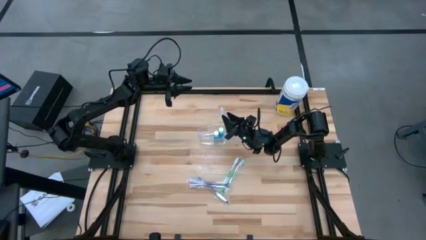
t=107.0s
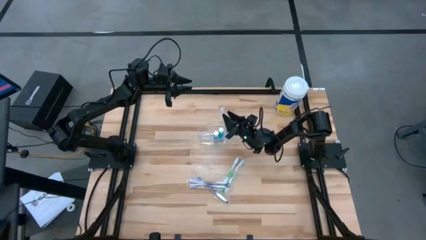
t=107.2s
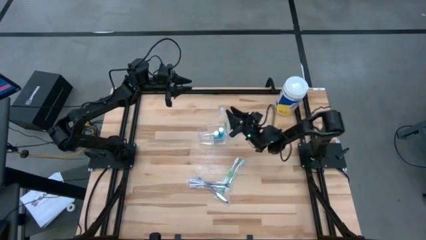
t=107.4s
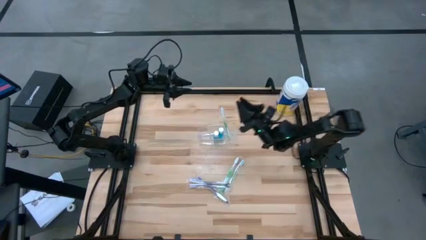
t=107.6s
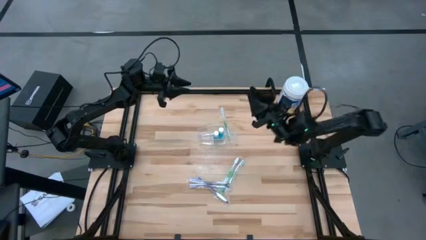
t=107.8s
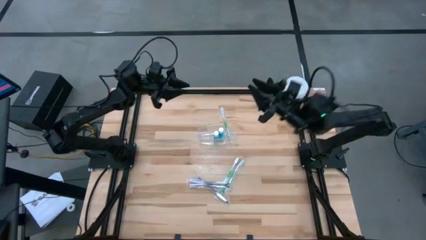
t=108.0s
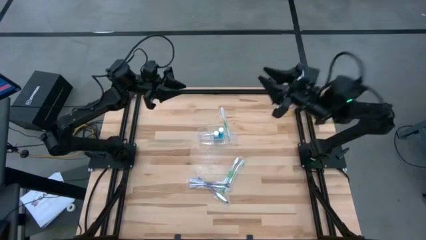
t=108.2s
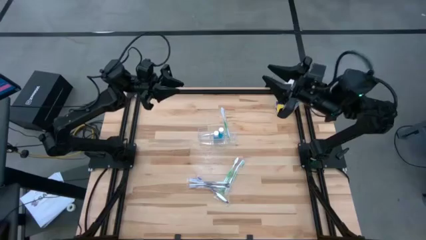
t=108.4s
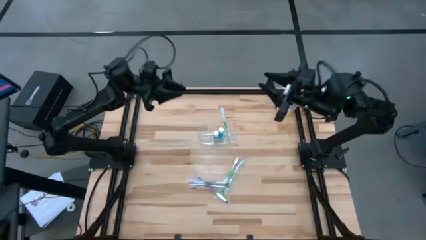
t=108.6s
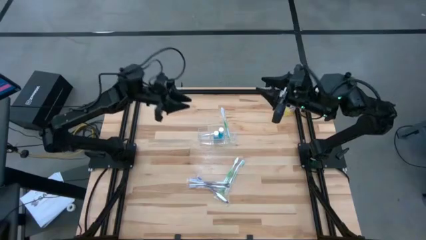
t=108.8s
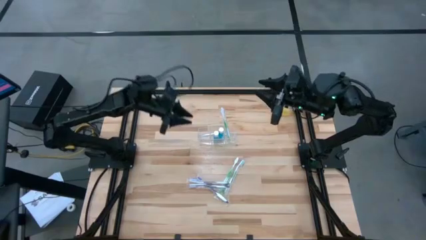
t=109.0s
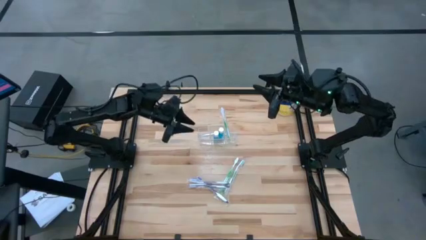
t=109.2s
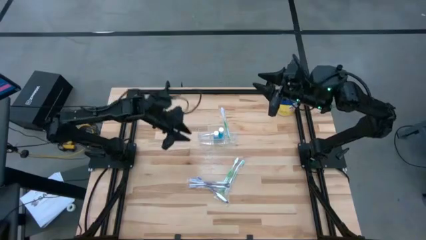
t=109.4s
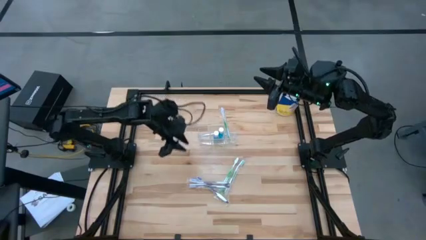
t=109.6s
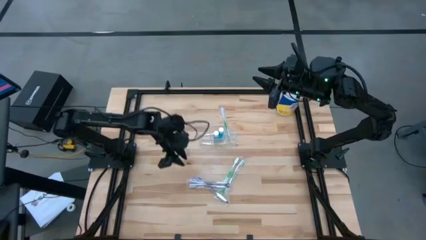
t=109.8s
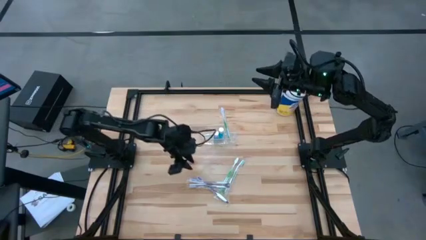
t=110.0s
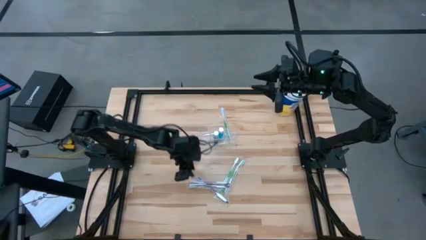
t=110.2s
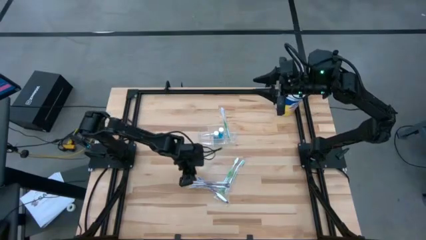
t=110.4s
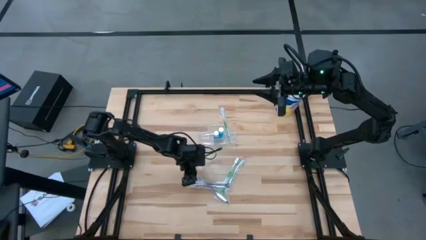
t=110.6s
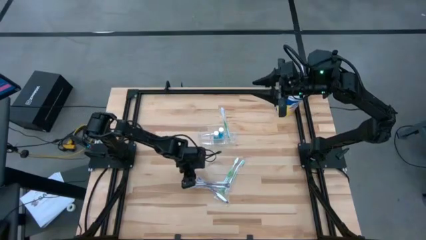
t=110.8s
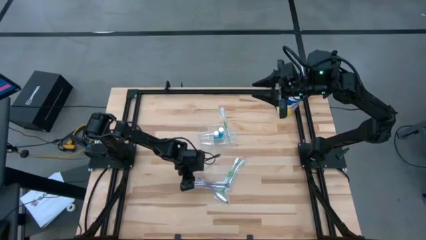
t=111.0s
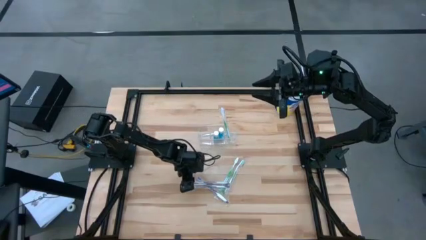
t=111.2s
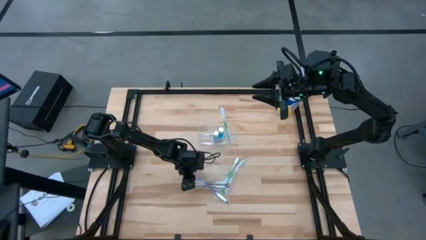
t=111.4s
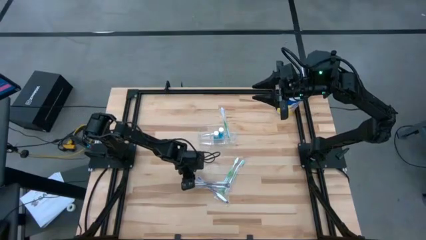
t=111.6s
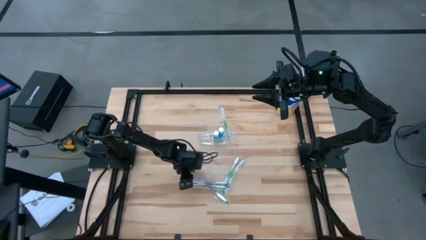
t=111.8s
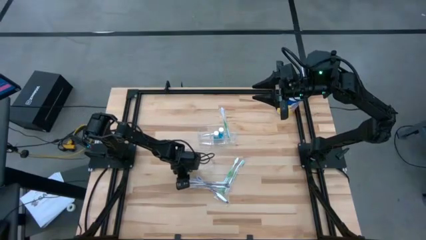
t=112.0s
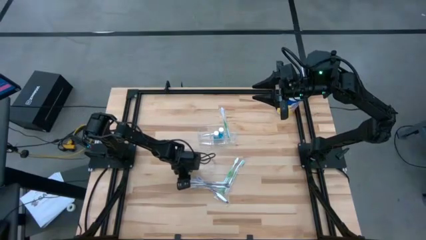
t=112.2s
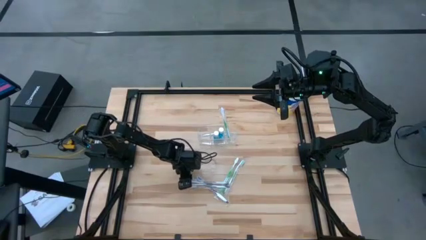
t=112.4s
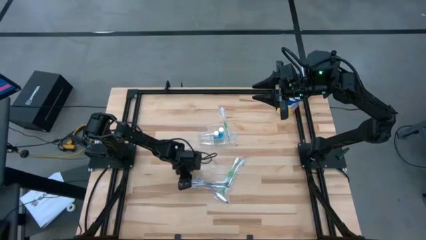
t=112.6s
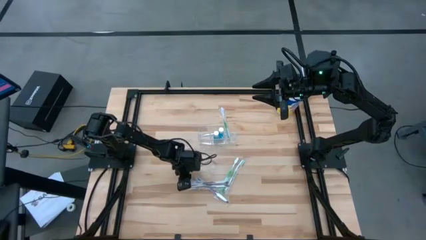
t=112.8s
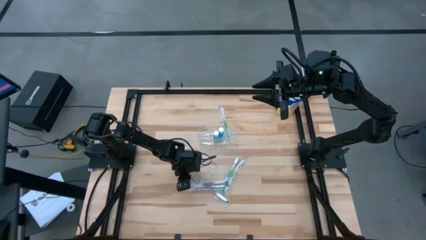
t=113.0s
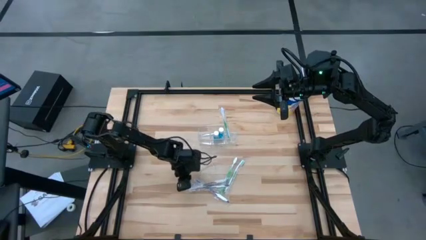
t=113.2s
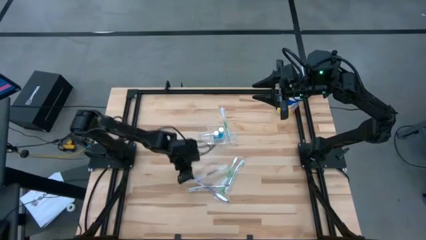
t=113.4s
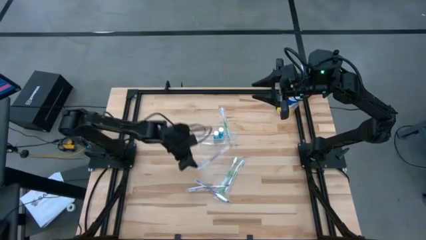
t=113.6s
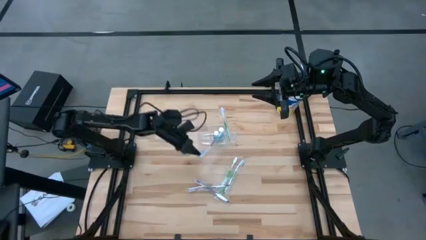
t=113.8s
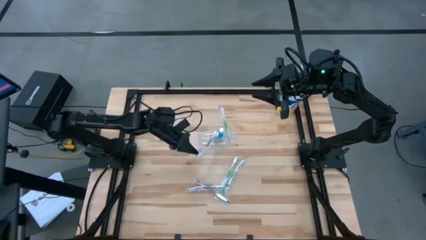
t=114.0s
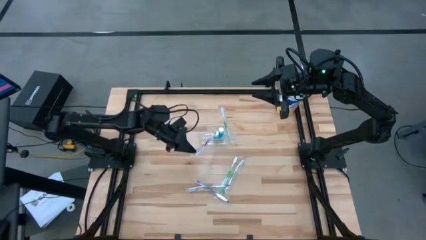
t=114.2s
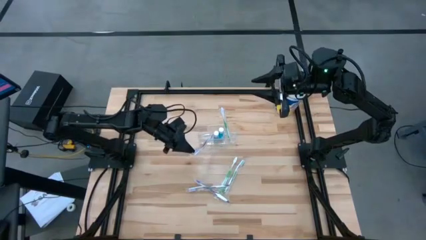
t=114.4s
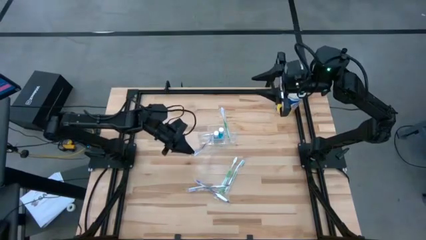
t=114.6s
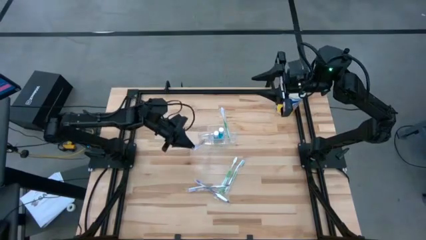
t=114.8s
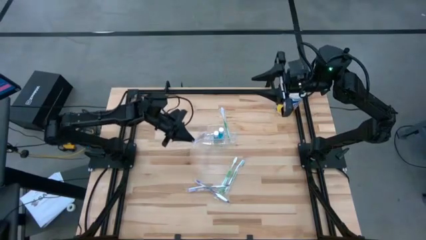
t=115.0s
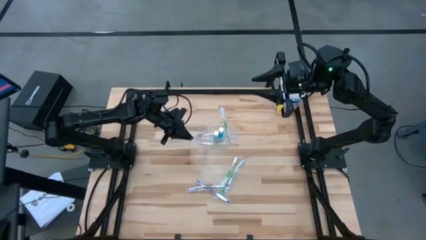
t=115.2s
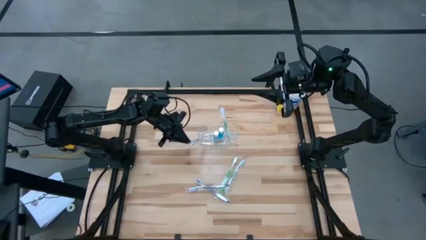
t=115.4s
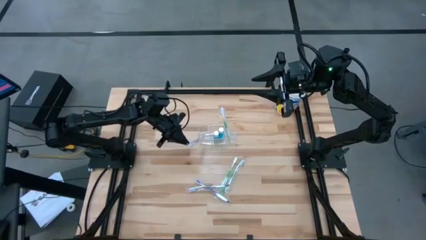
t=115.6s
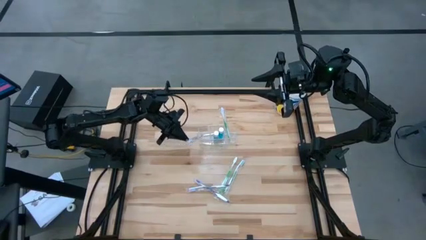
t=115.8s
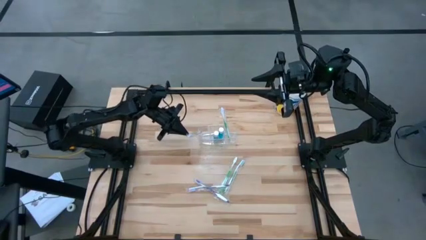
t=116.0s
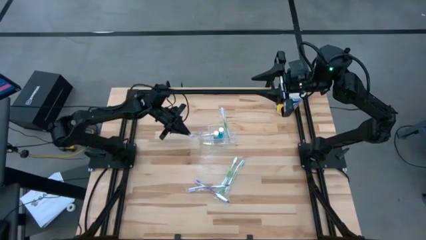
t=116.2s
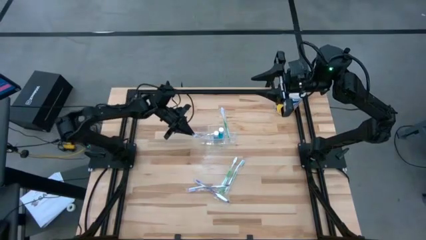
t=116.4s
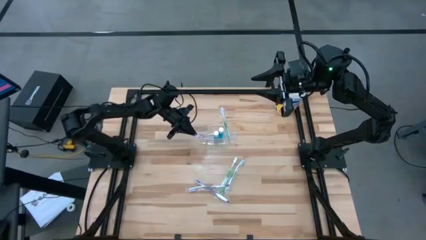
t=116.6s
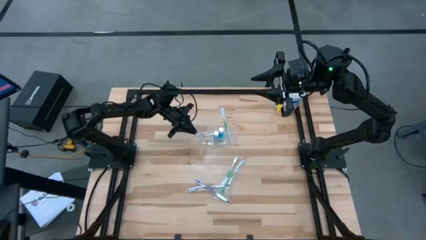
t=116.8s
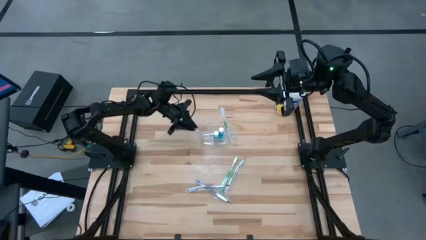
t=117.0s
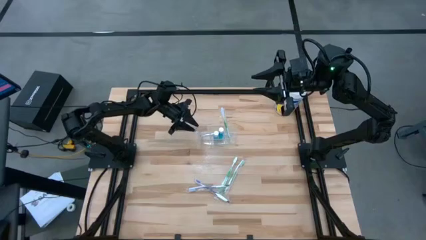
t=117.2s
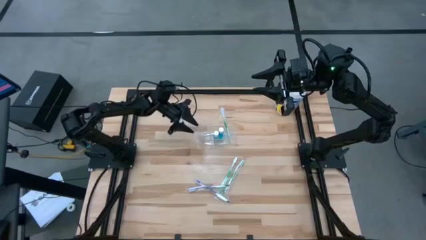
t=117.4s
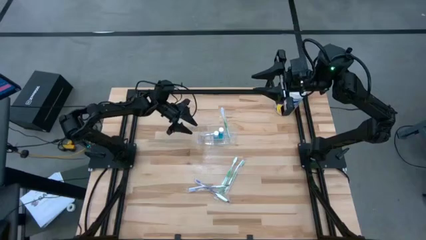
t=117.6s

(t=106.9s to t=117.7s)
Task: Pick & Place toothbrushing station
Put the top left purple toothbrush into the transparent organizer

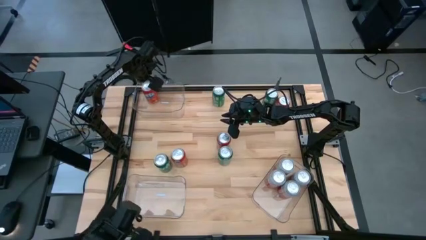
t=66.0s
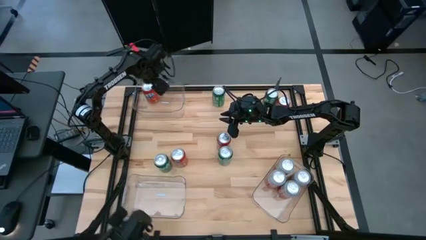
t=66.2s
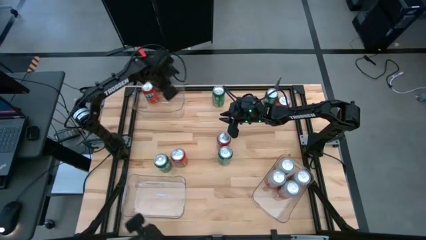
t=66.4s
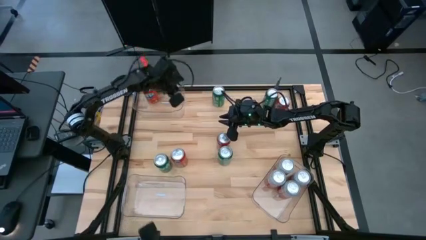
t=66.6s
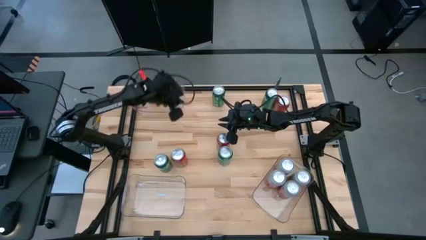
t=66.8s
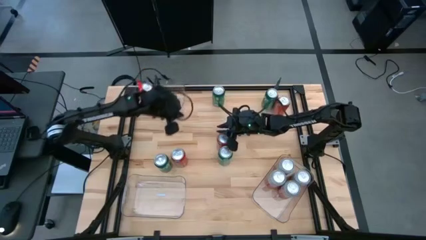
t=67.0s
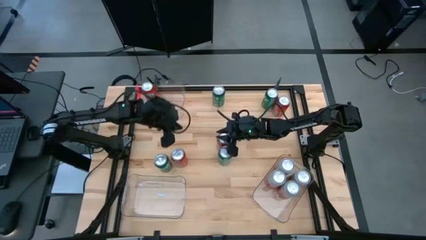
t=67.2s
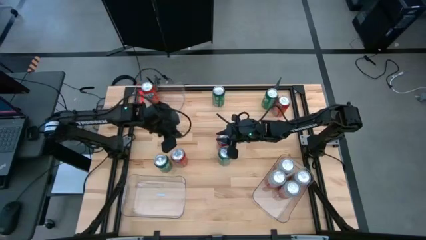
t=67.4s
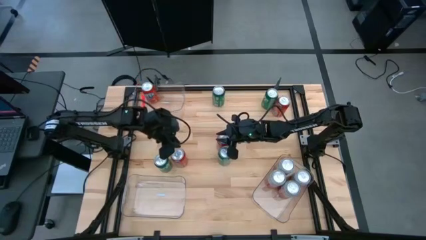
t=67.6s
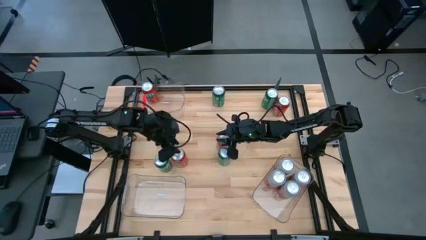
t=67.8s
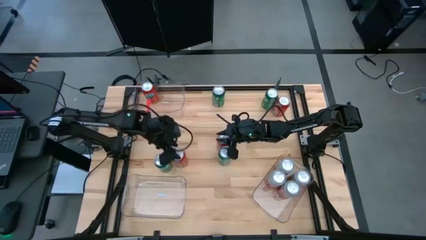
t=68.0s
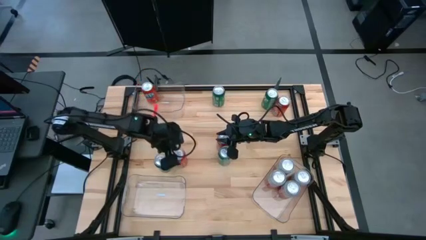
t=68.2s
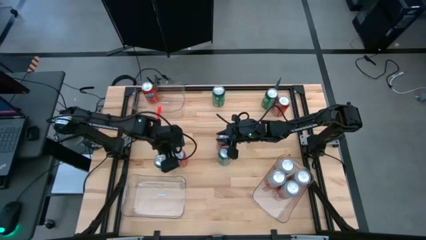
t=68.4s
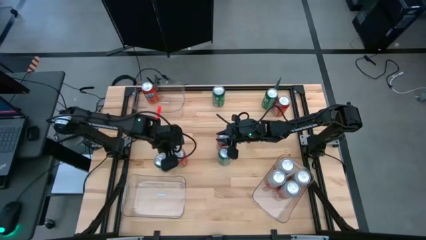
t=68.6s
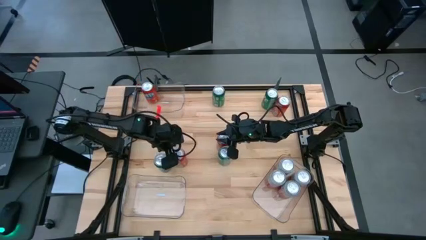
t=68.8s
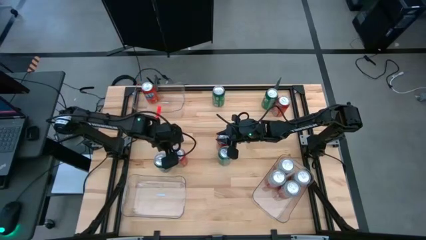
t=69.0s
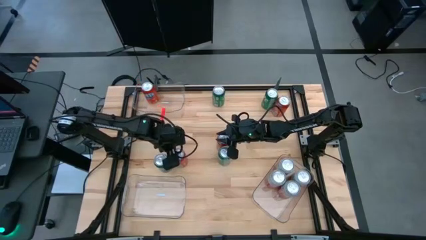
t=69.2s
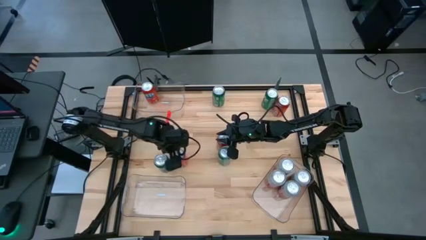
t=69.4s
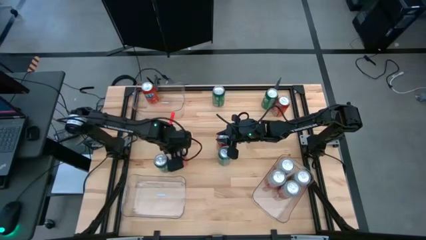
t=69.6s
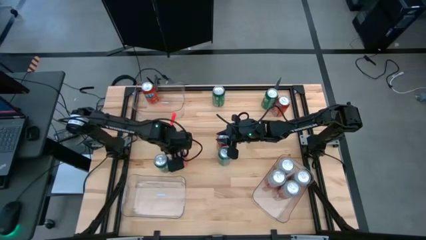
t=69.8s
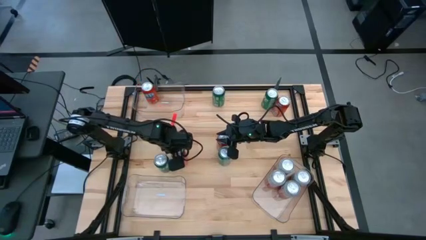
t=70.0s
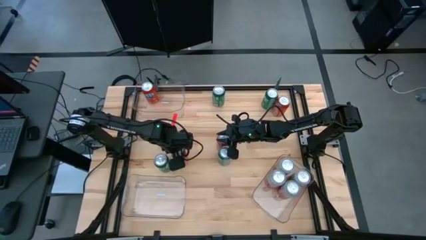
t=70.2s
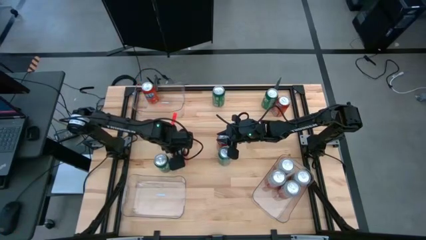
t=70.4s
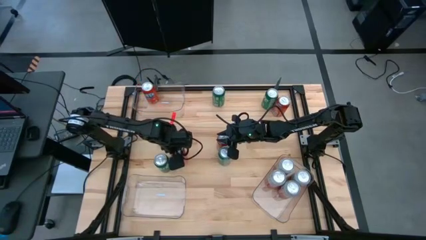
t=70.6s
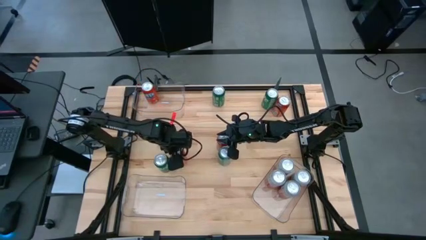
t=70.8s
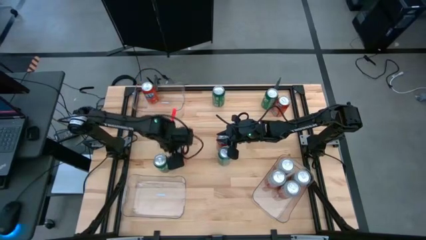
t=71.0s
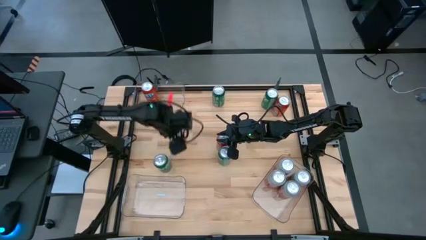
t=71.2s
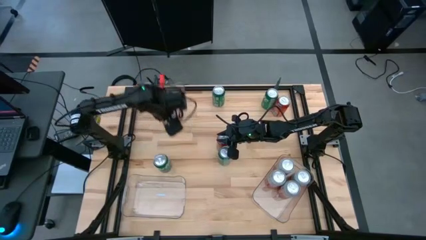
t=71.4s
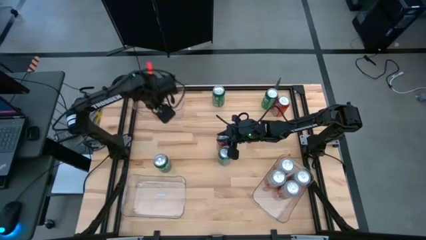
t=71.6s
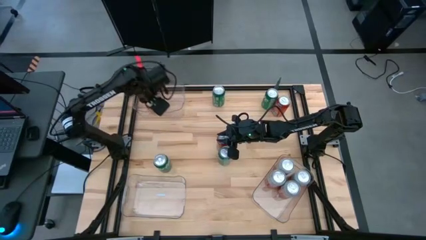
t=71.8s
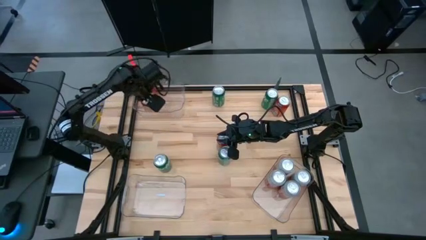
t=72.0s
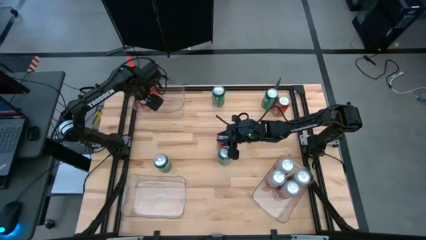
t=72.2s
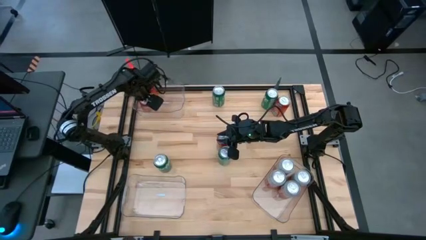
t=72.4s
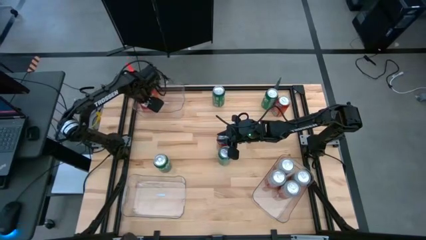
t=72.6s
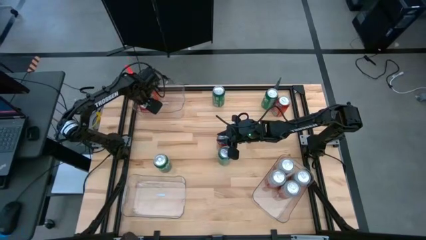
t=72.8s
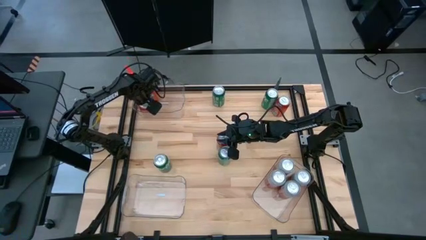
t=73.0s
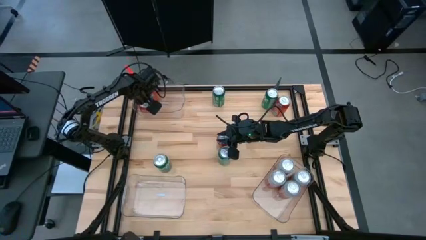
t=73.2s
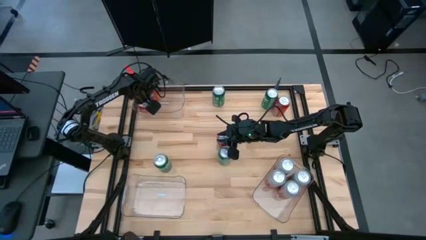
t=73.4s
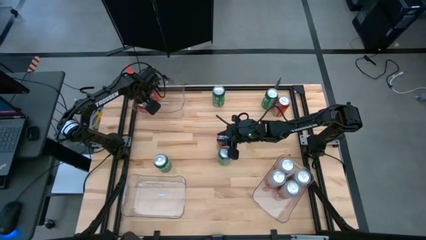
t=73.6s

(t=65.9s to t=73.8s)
Task: Sort soda cans
Put the orange soda can into the top left transparent bin
